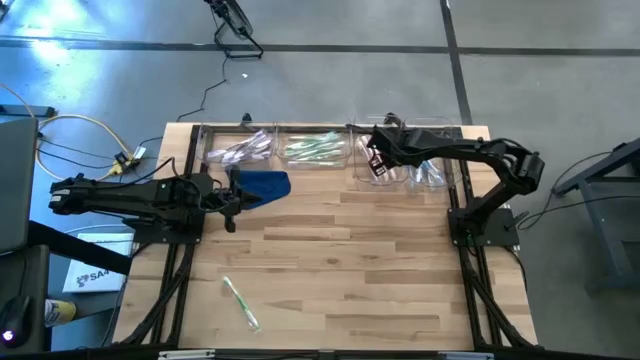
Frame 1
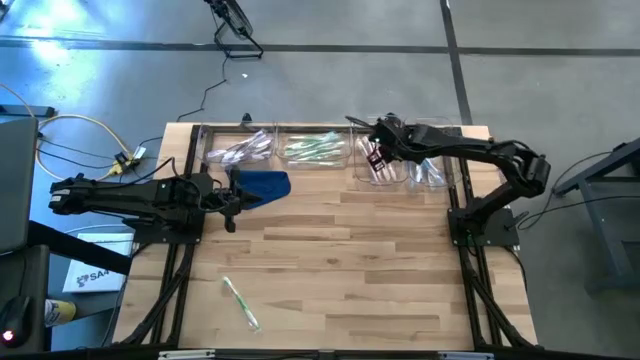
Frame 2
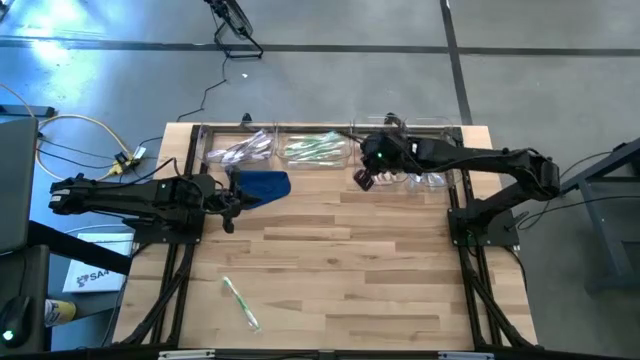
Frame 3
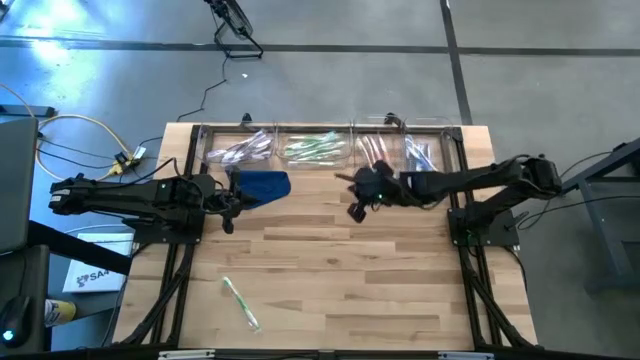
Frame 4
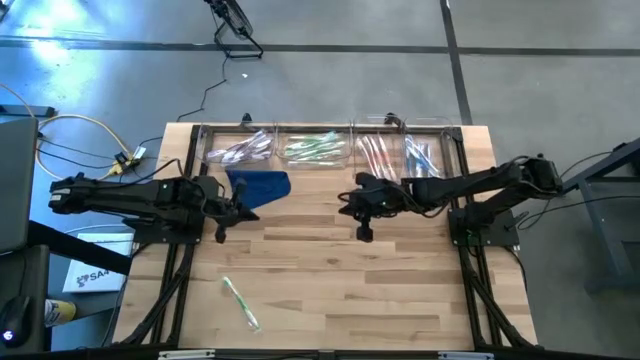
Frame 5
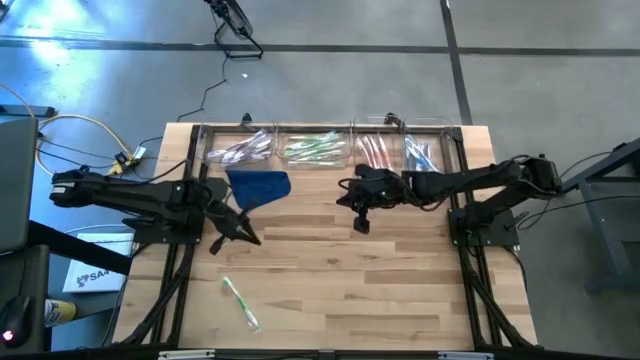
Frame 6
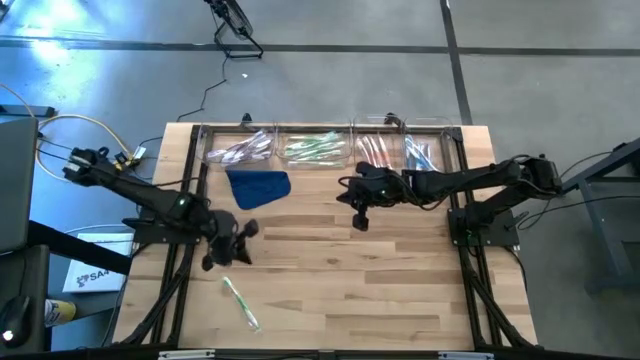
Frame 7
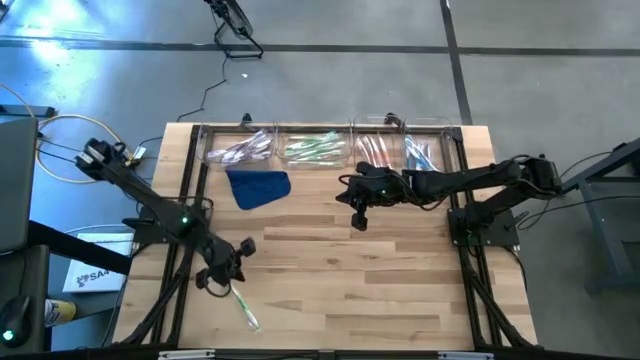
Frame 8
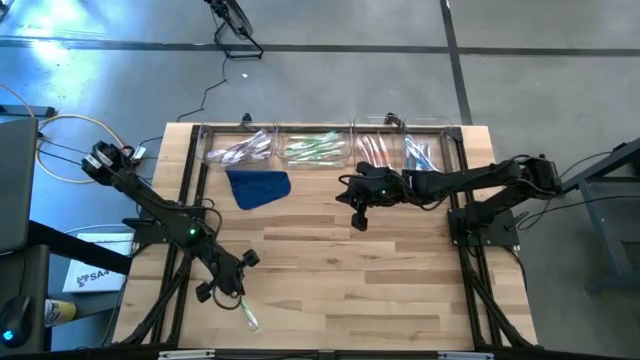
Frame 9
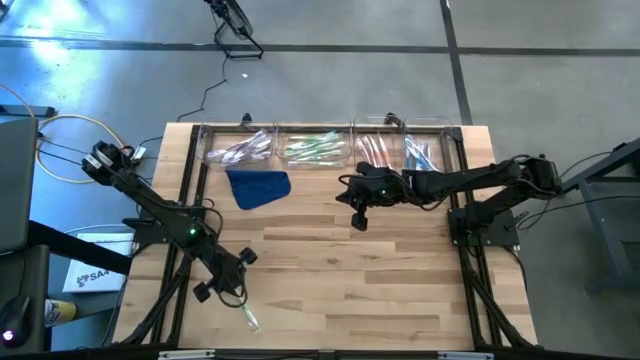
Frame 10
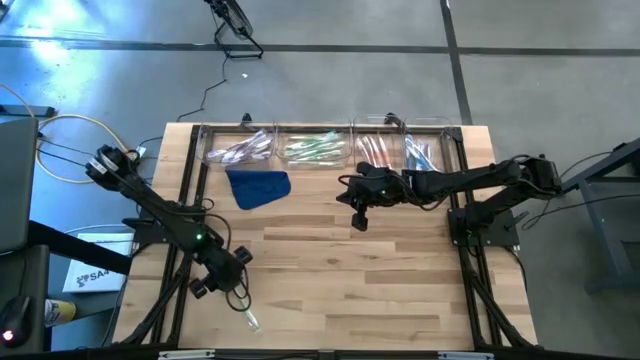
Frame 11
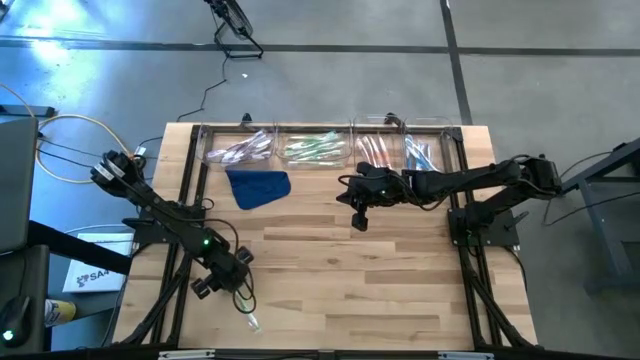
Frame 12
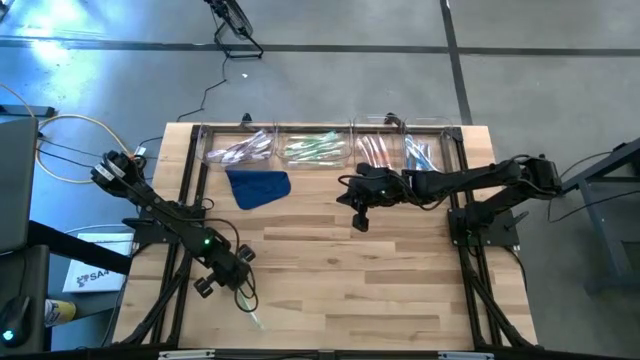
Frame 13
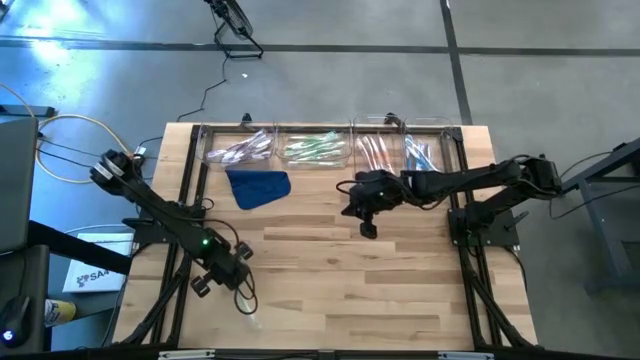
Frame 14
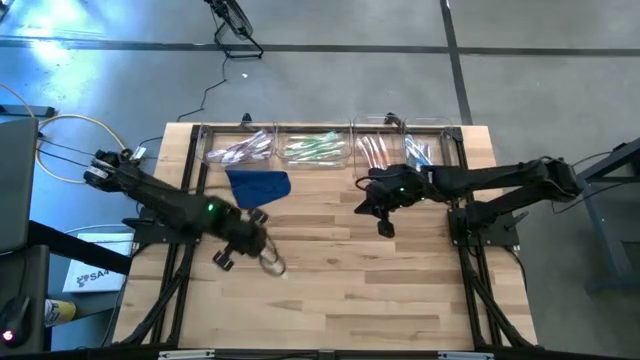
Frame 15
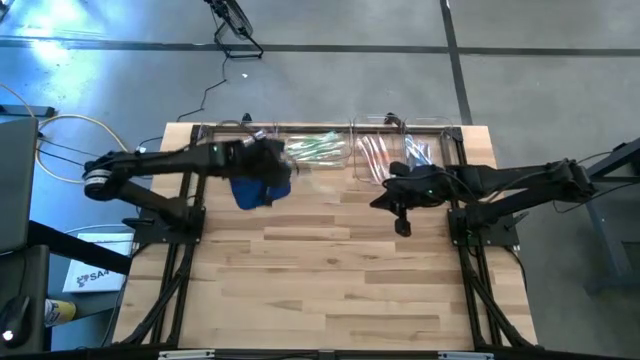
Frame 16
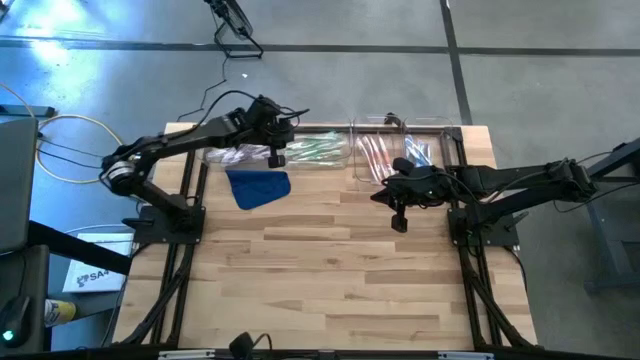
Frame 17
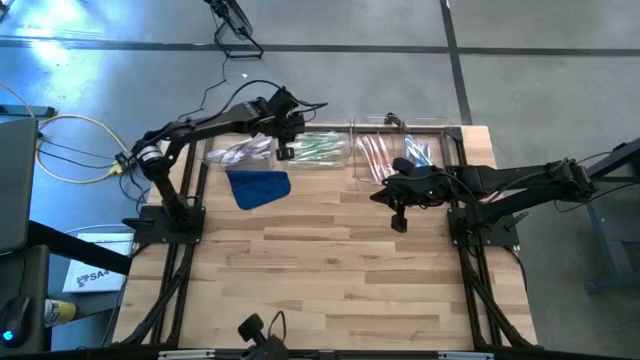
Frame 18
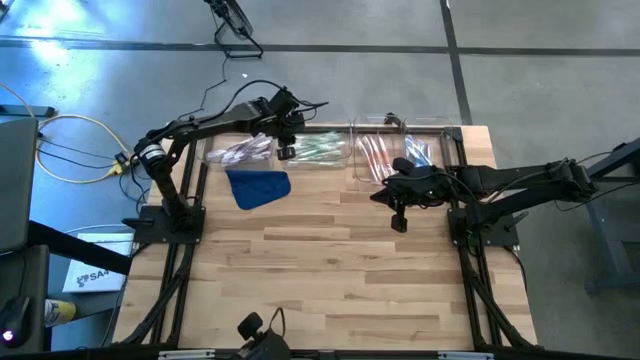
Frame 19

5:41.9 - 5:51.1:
Task: Pick & Place Toothbrushes
Put the green toothbrush into the middle left transparent bin

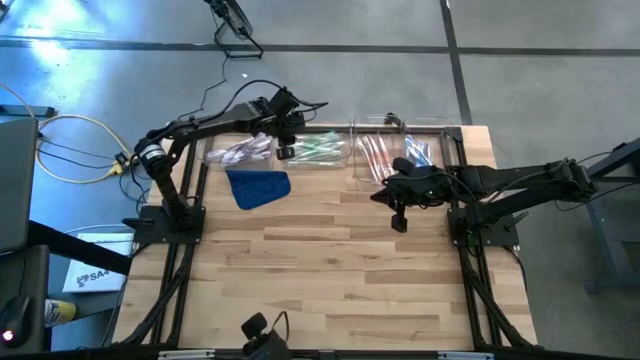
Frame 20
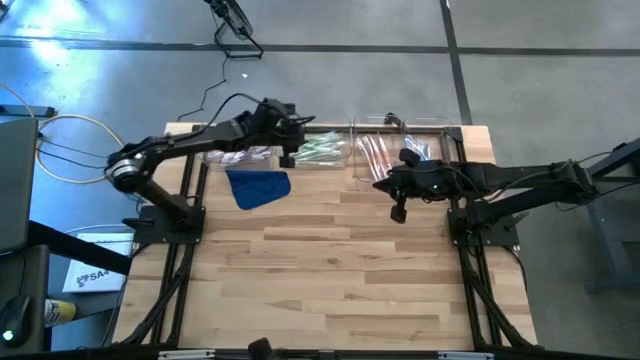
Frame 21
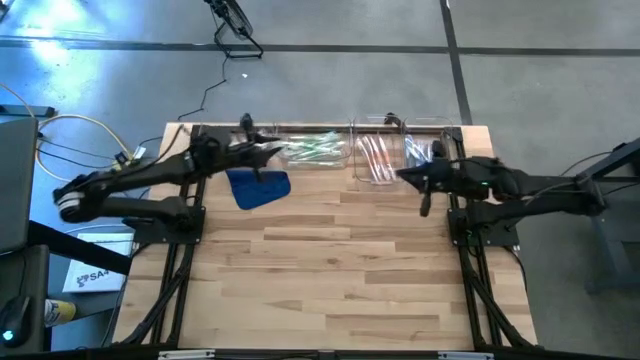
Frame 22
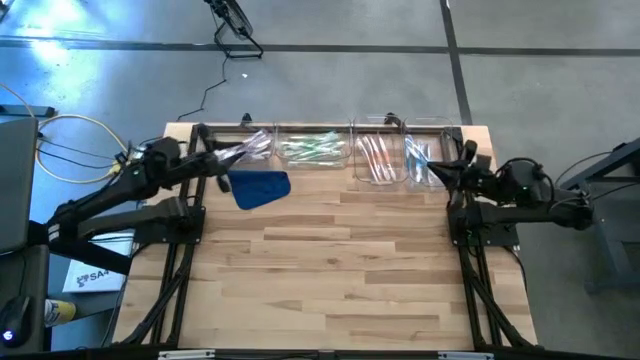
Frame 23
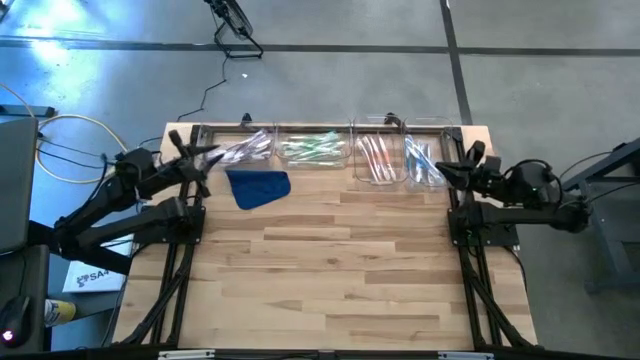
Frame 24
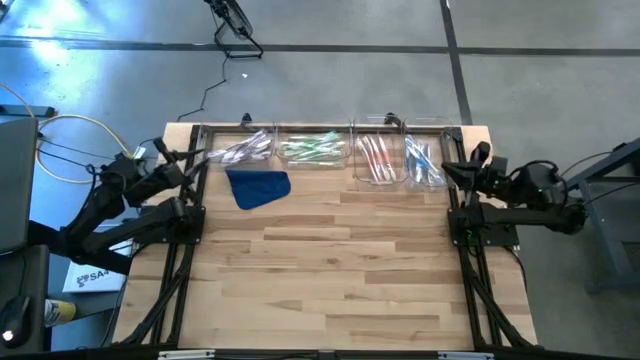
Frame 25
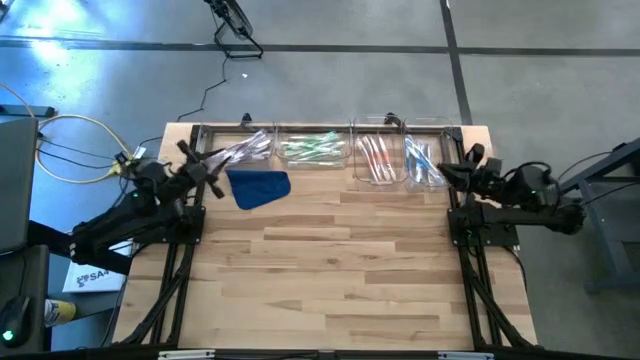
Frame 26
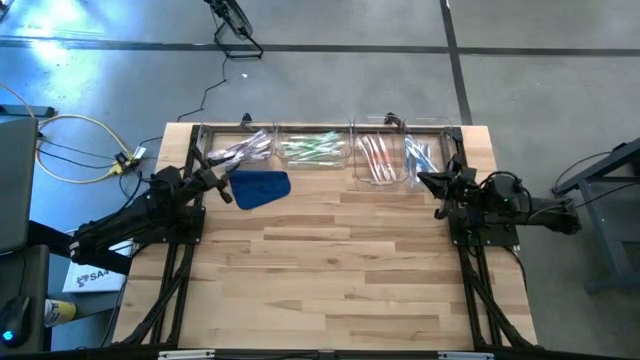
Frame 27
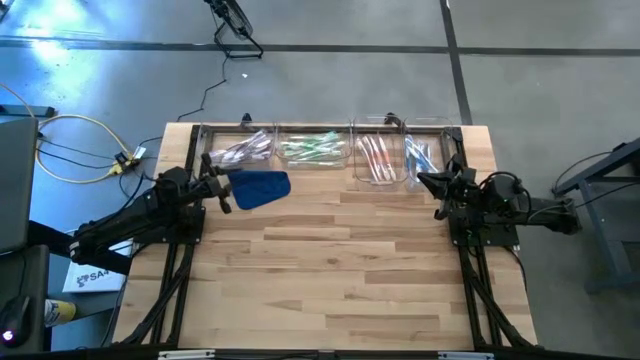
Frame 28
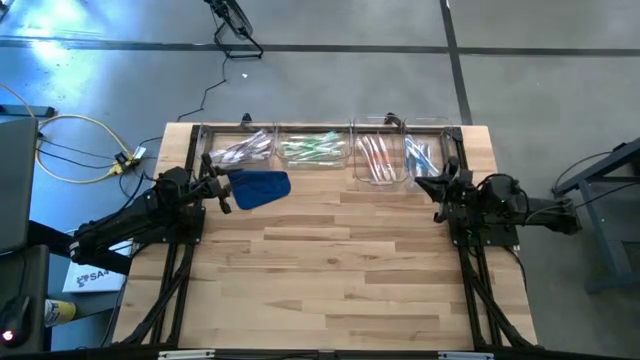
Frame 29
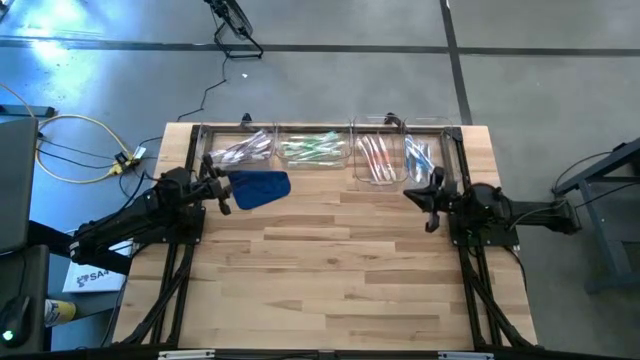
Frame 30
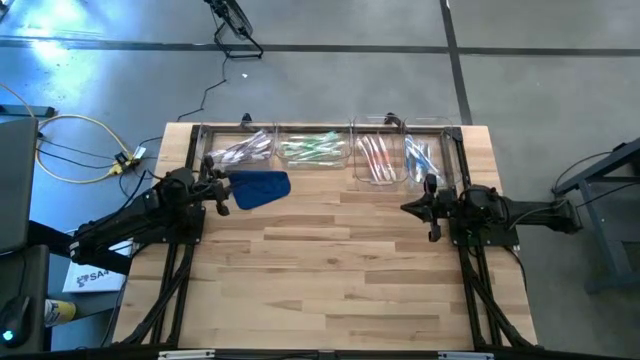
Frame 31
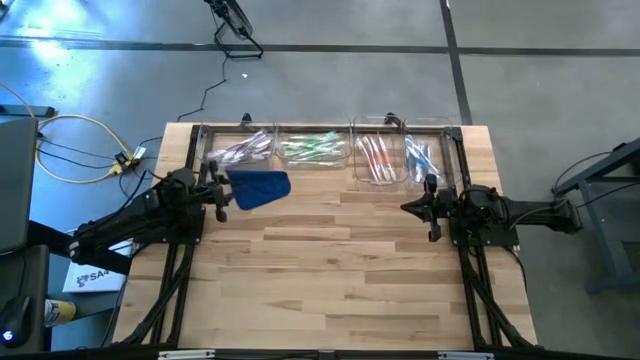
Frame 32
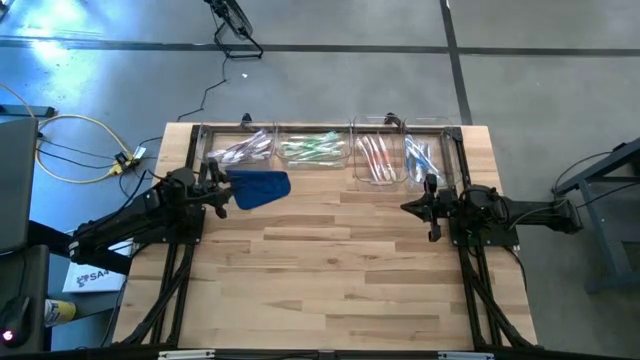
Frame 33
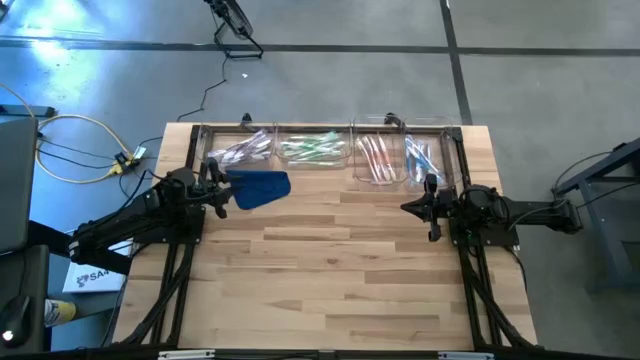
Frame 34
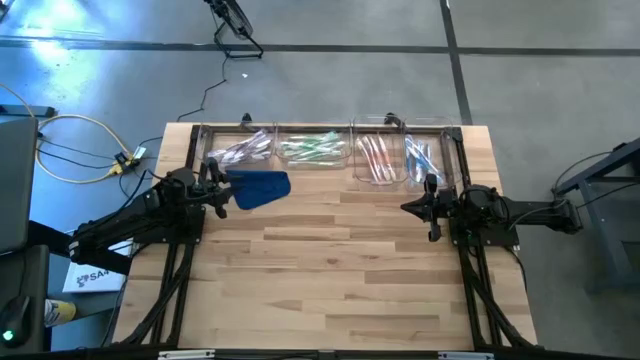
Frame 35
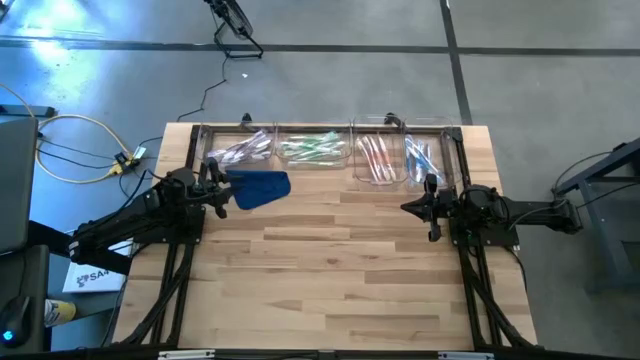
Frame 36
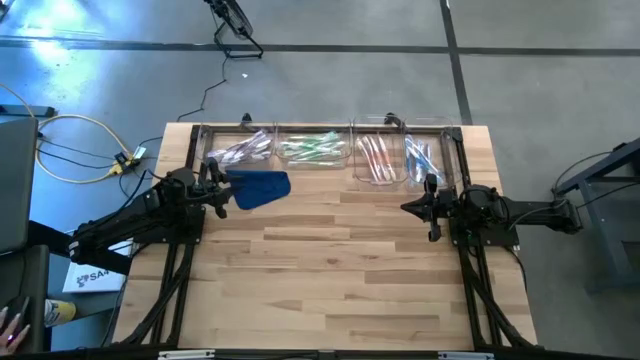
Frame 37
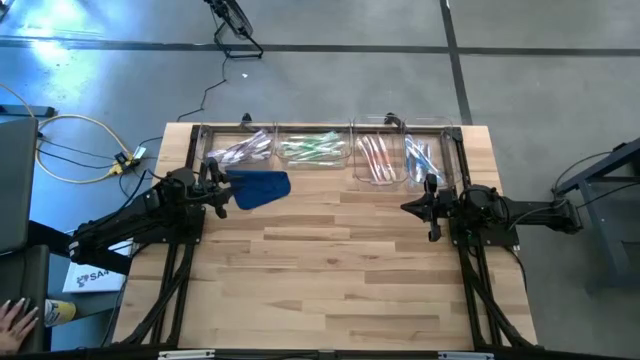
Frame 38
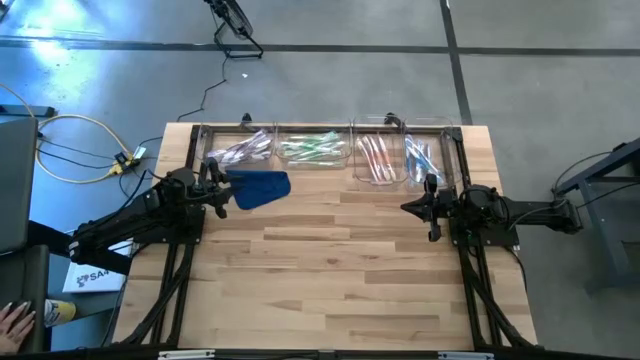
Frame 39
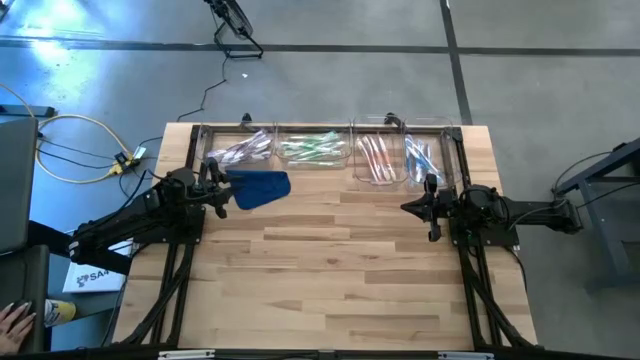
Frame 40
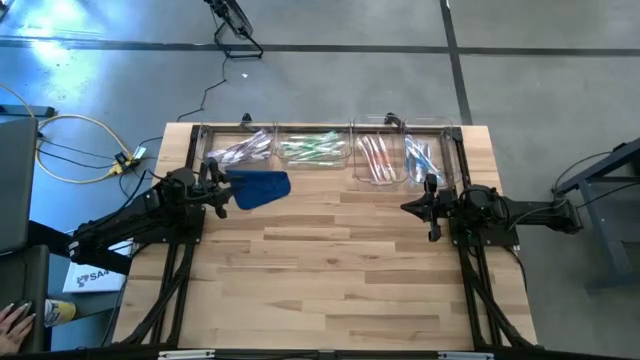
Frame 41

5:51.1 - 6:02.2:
Return to Home Position
